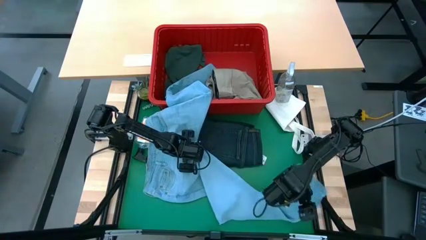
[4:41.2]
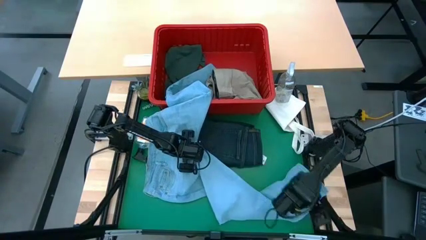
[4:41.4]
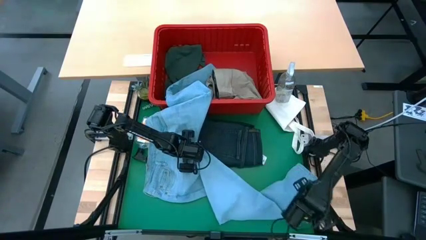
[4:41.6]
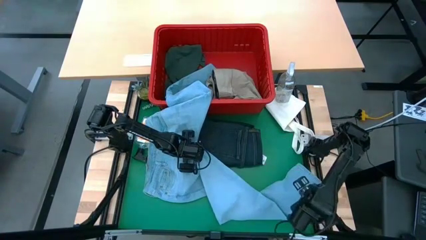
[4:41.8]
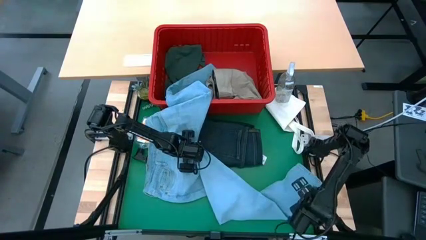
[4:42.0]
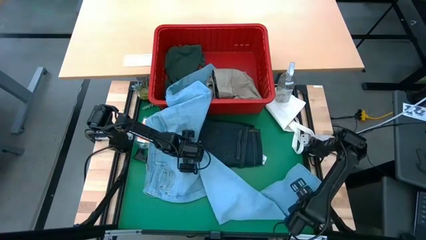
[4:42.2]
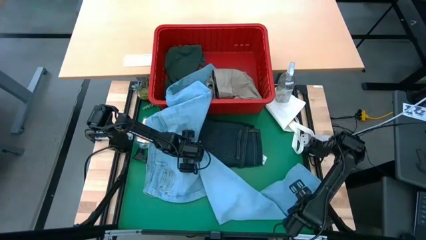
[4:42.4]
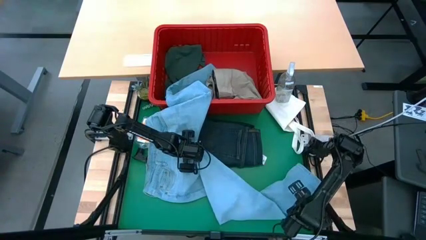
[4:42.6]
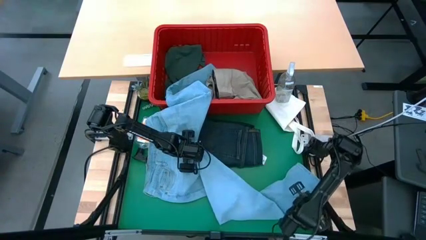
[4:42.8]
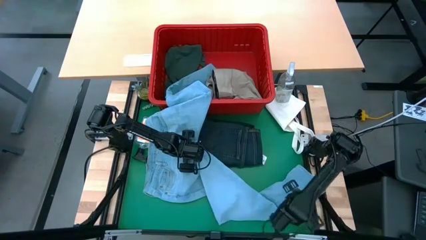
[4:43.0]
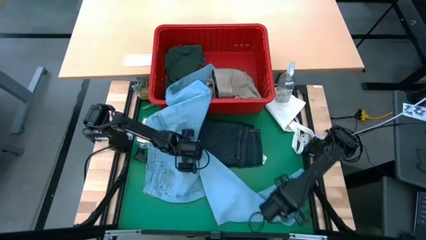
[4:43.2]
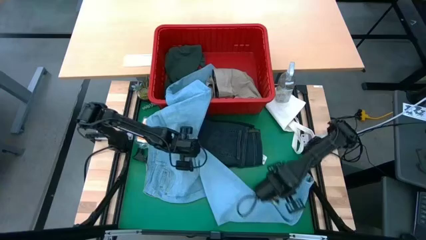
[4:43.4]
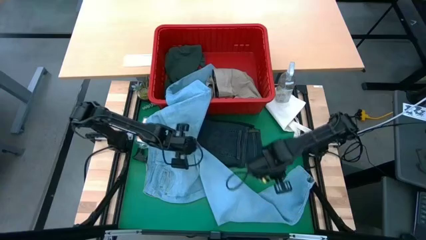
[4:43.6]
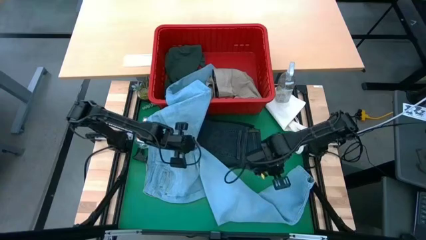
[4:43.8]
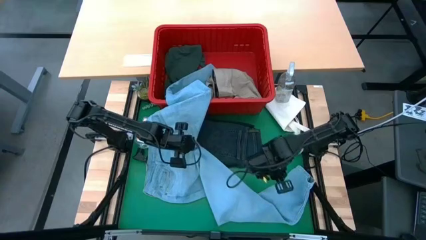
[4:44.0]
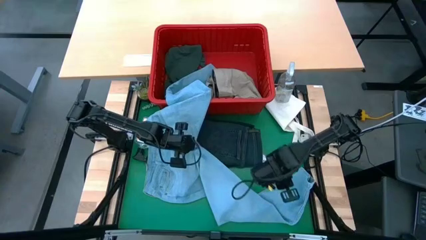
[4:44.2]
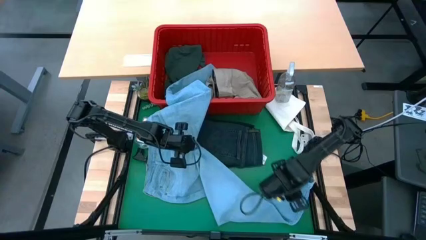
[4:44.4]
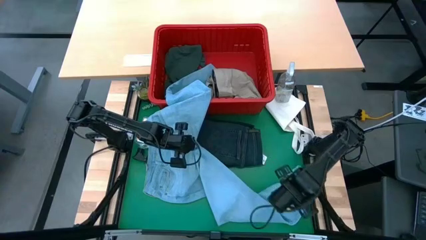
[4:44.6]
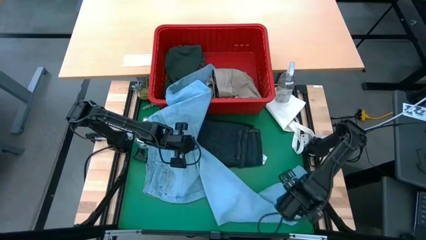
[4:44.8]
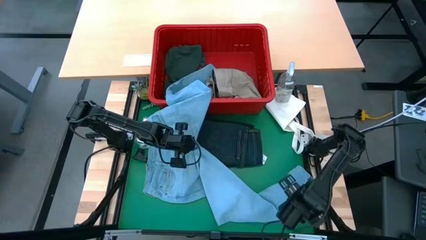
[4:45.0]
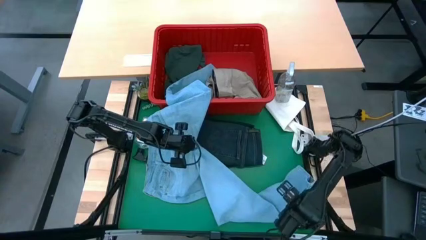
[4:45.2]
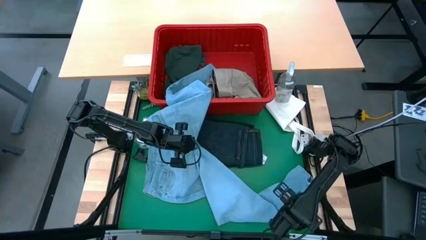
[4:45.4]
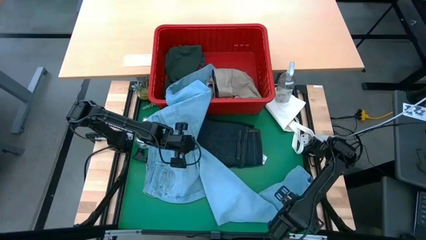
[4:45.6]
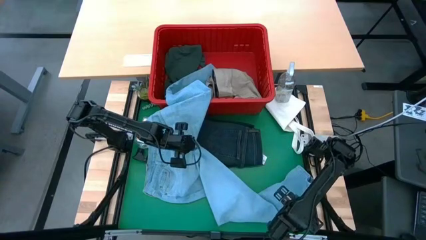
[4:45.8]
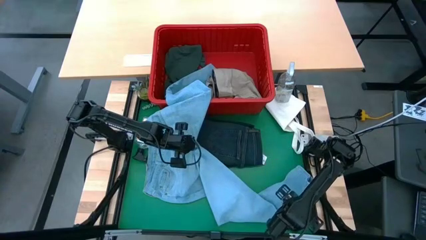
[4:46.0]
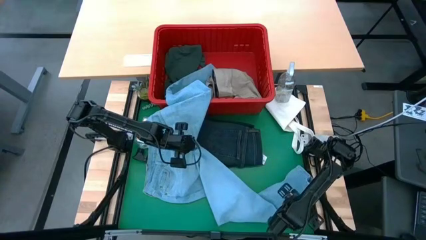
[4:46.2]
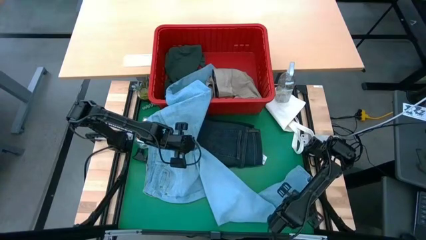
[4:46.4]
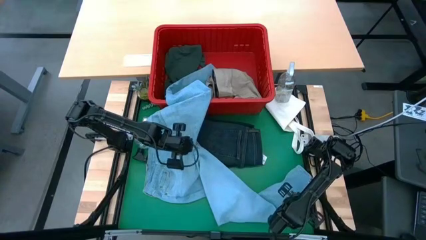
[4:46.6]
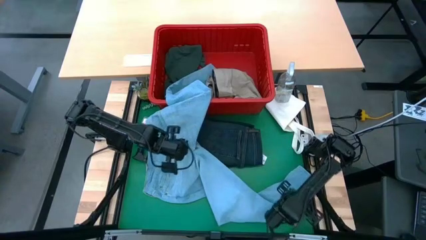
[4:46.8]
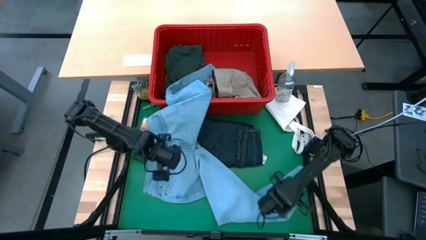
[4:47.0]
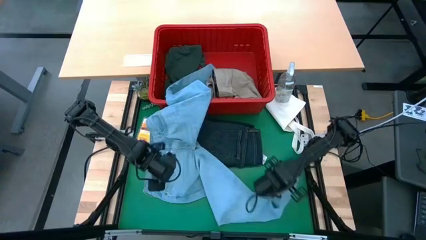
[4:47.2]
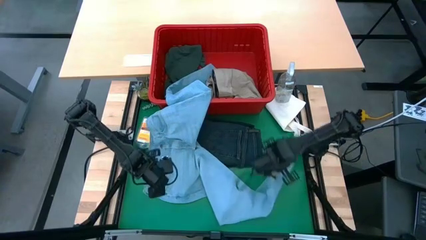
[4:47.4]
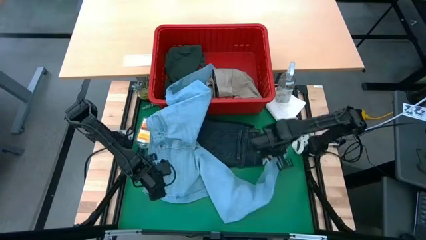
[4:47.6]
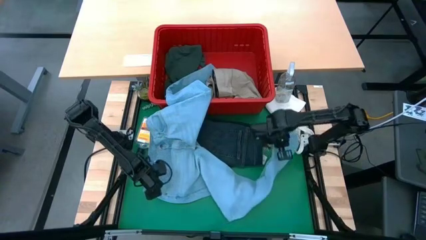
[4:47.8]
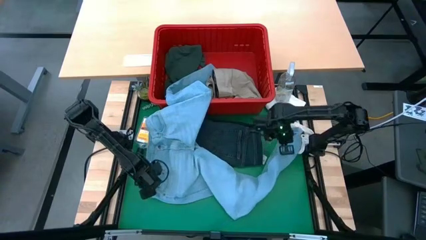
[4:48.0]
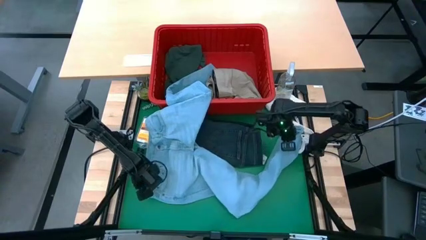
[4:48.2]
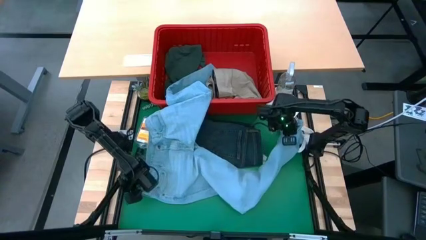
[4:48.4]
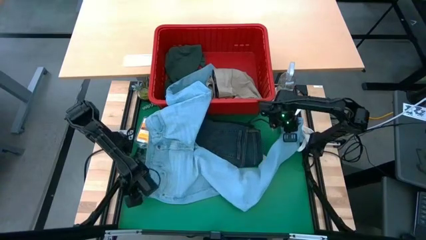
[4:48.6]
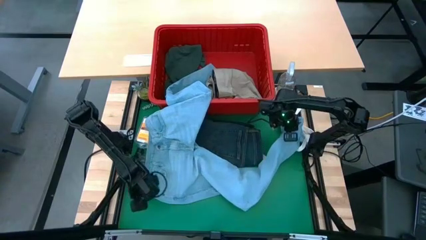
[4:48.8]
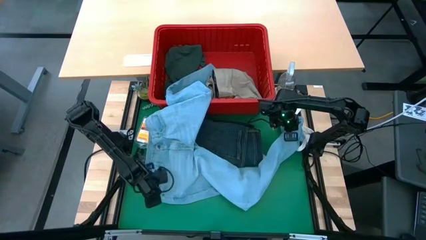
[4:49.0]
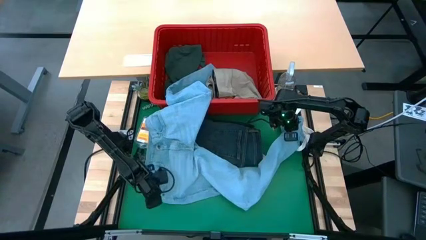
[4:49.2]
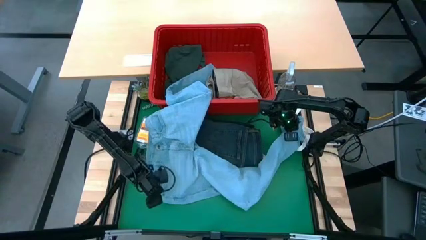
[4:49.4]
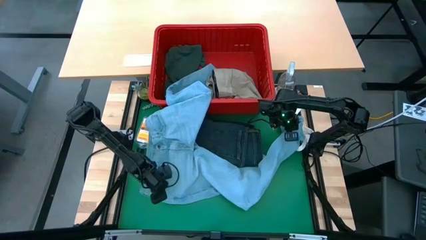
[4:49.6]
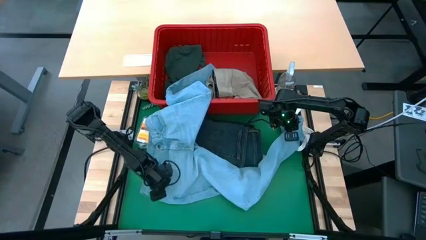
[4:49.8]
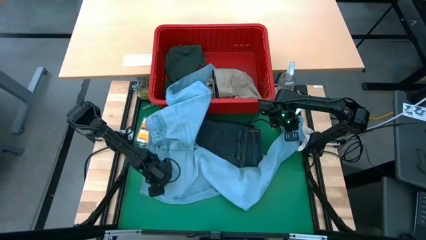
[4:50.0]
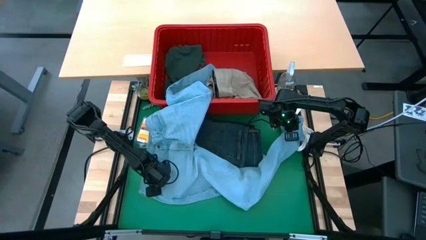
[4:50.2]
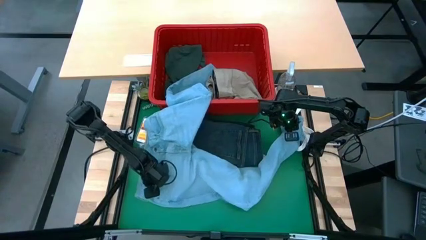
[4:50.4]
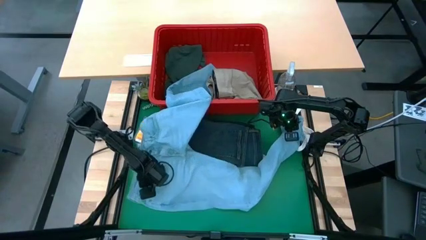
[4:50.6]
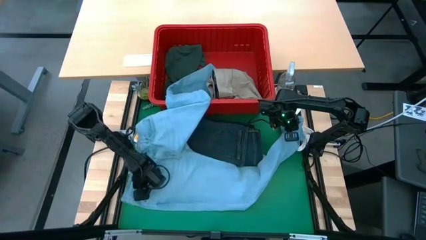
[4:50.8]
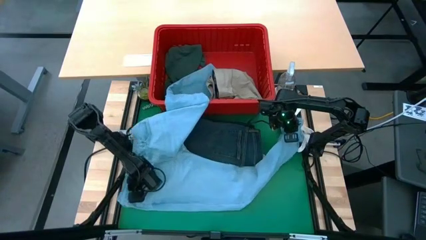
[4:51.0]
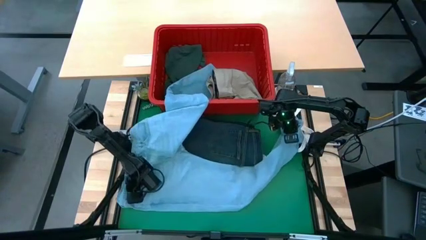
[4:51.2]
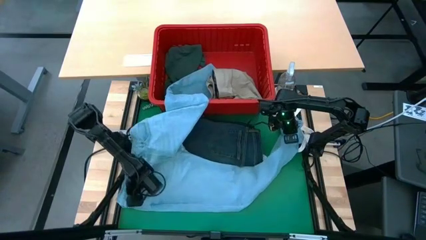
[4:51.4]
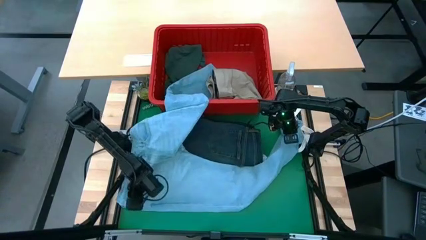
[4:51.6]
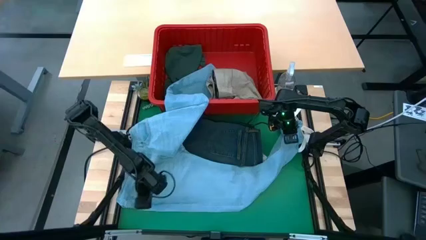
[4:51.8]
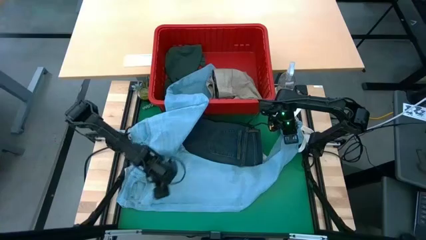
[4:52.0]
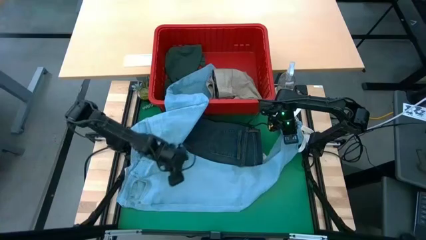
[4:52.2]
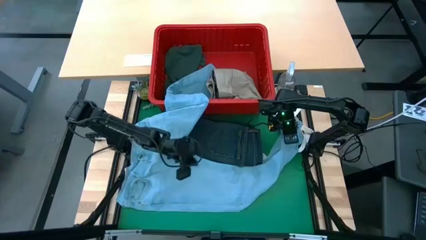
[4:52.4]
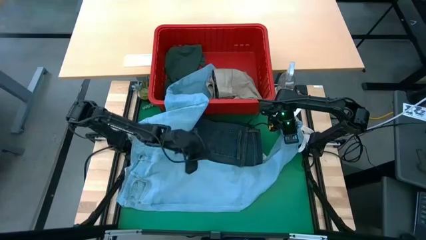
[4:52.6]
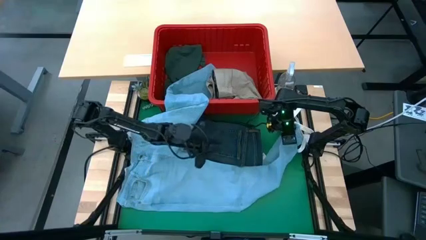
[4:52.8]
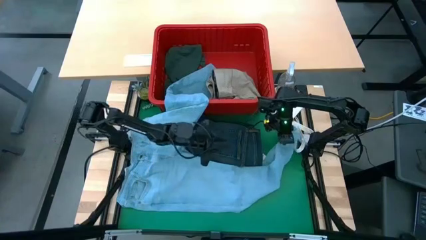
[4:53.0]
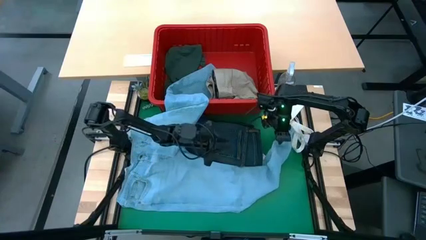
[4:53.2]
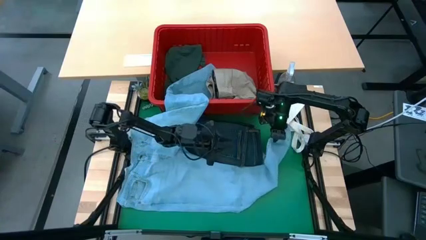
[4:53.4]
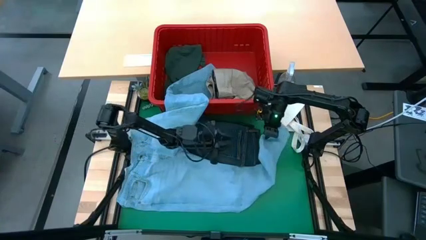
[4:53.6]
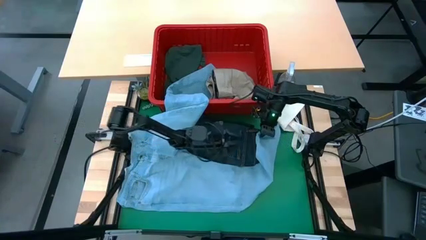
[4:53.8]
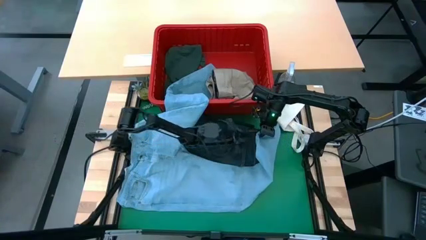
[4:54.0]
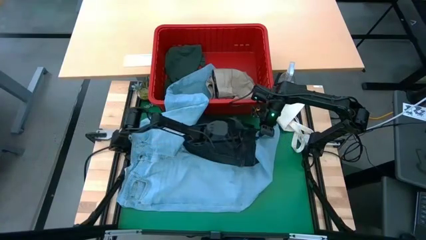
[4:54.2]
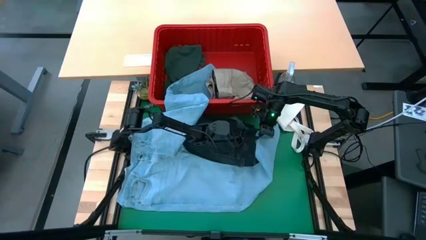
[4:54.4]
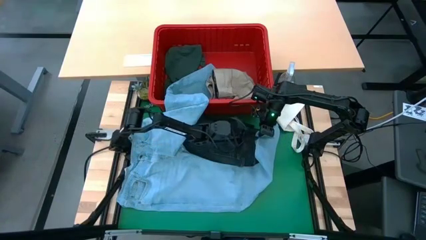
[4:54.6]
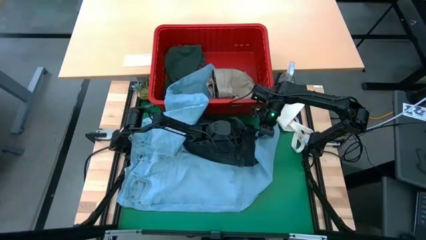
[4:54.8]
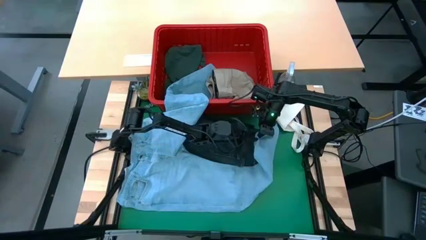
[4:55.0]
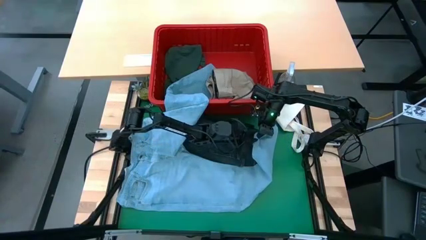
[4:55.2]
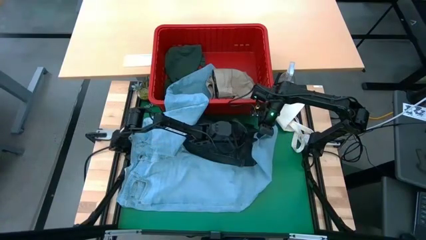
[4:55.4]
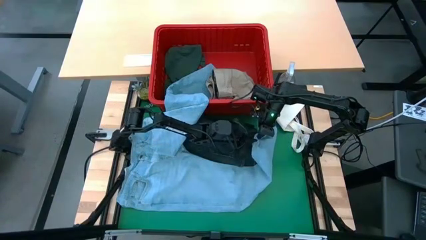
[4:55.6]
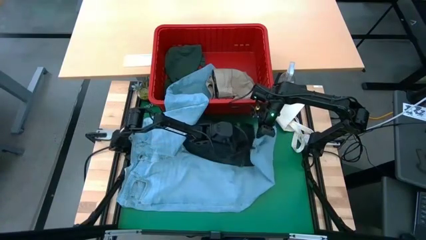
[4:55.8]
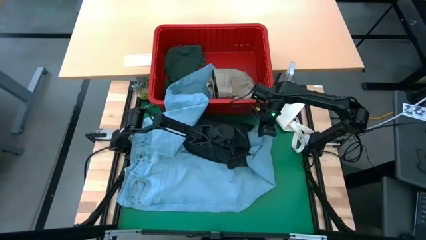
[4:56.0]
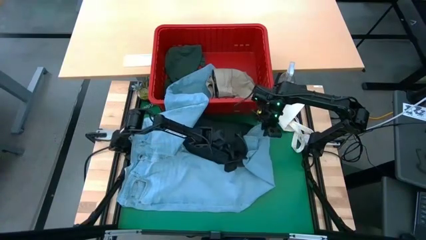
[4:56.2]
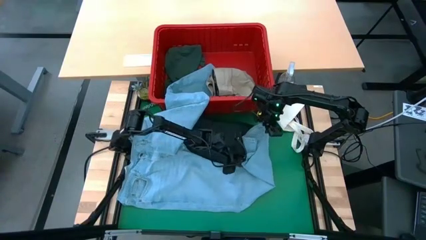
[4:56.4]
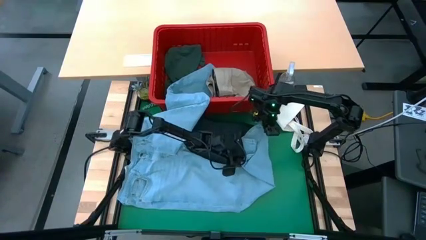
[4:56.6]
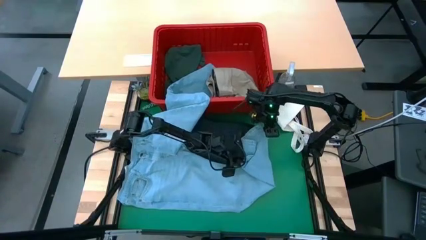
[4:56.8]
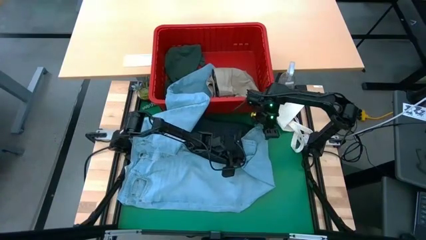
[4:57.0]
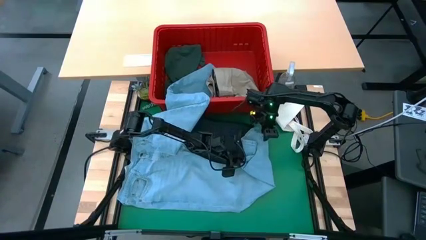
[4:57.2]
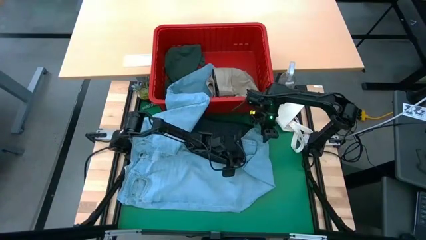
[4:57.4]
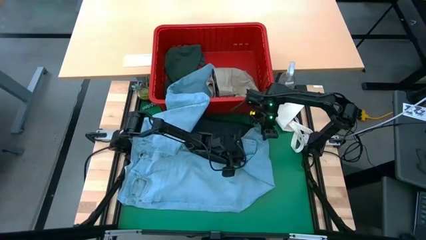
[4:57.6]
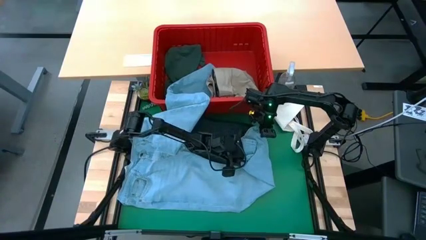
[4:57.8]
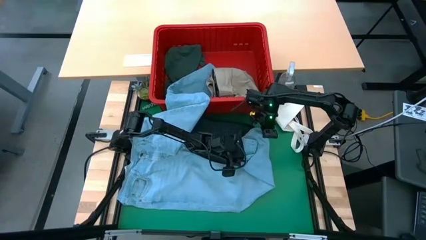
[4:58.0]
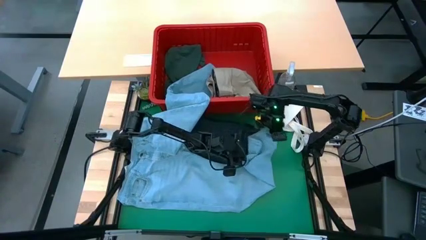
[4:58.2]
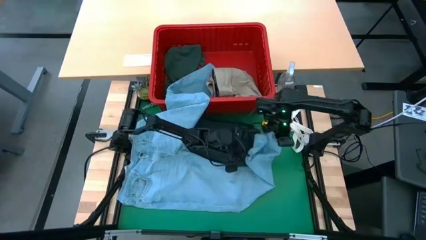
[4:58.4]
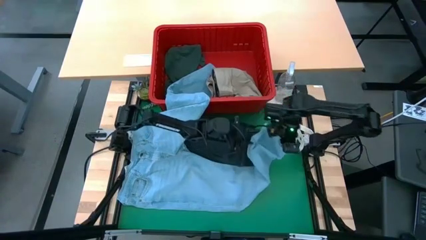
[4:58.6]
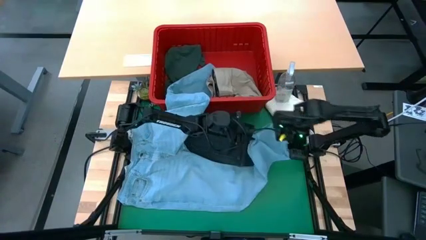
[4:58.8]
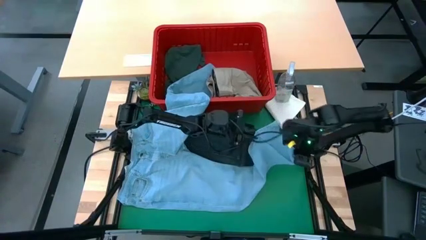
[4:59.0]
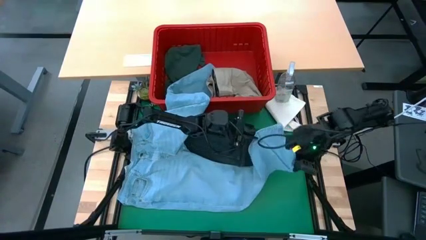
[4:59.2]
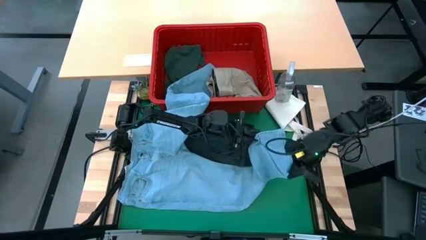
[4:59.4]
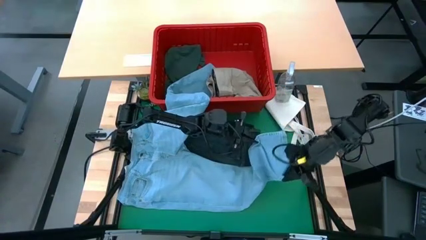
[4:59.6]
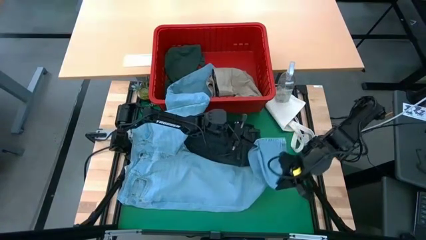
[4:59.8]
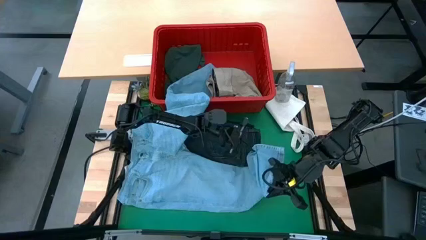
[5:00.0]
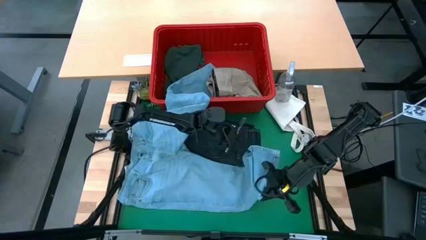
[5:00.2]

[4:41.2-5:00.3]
Task: Fold laundry
Fold the light blue jeans
